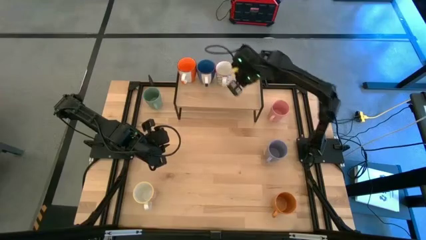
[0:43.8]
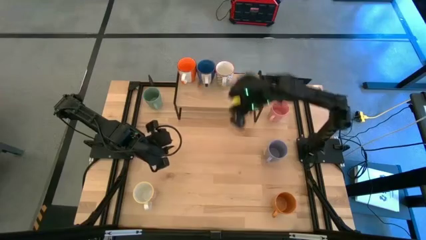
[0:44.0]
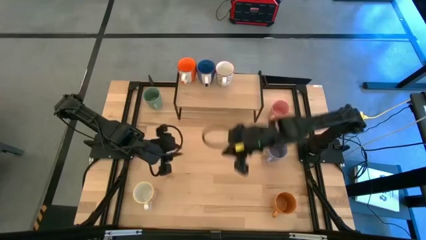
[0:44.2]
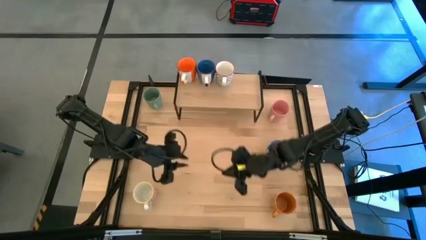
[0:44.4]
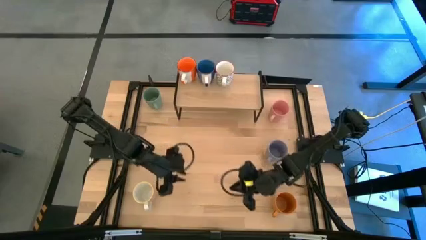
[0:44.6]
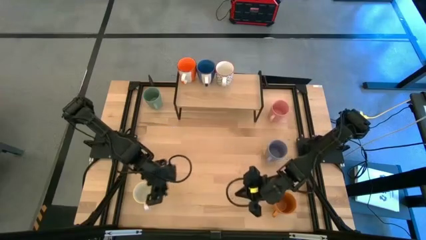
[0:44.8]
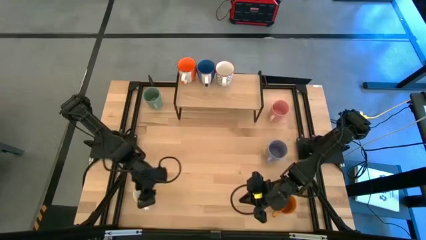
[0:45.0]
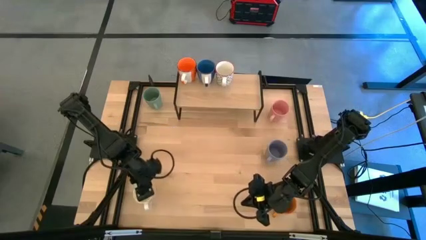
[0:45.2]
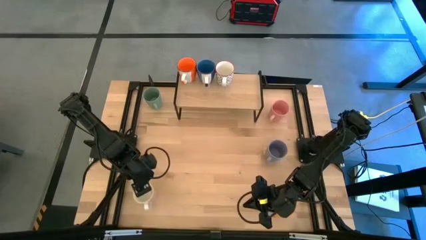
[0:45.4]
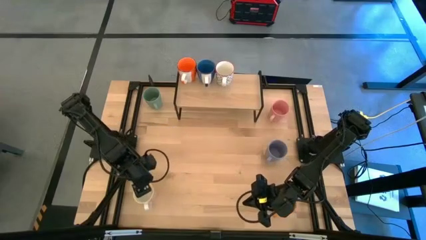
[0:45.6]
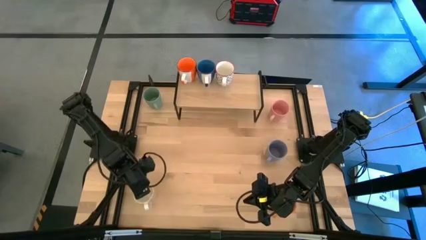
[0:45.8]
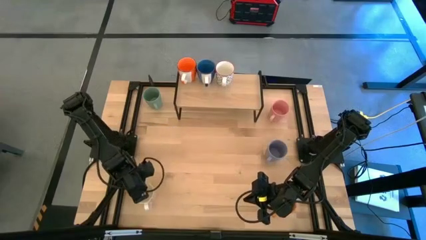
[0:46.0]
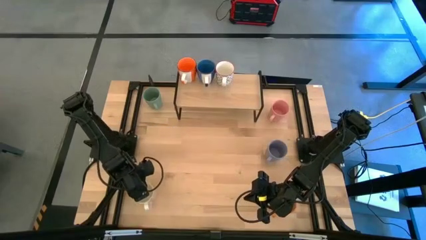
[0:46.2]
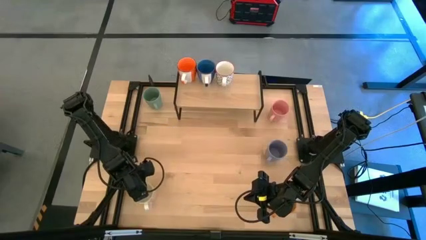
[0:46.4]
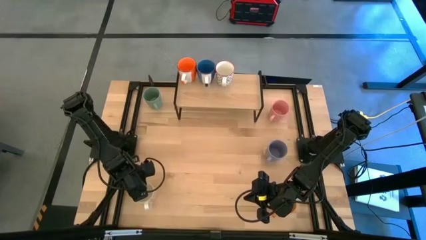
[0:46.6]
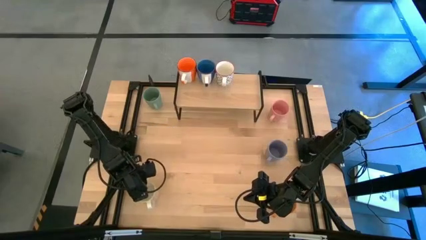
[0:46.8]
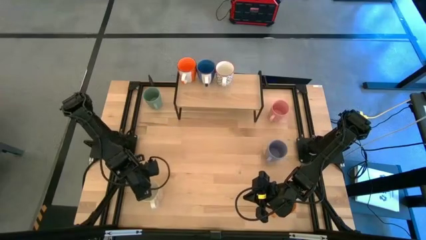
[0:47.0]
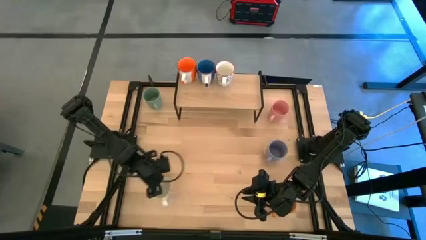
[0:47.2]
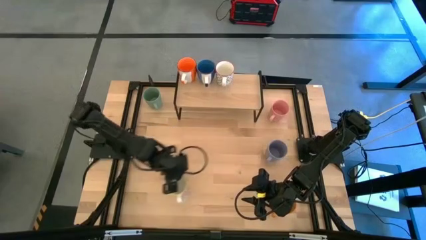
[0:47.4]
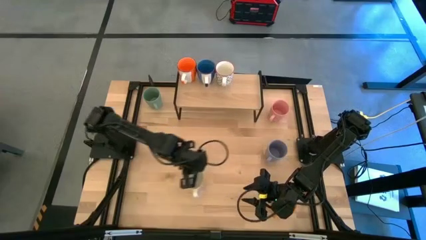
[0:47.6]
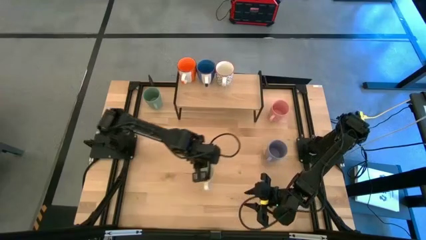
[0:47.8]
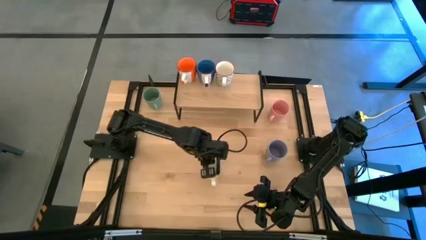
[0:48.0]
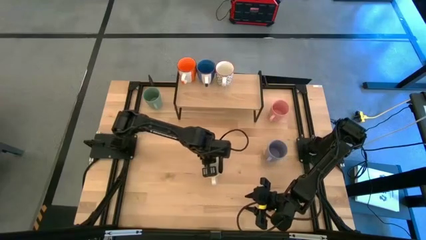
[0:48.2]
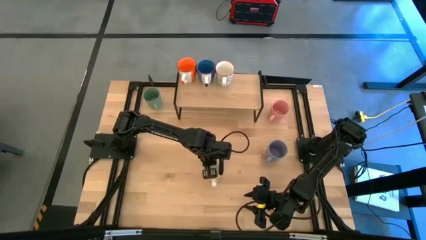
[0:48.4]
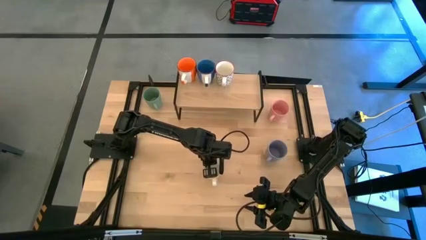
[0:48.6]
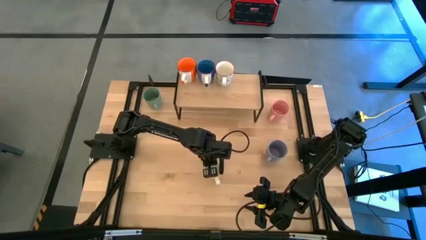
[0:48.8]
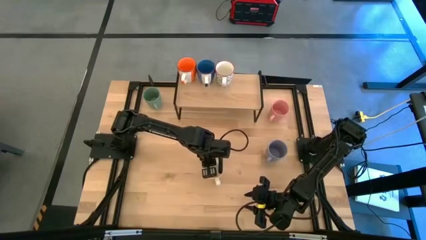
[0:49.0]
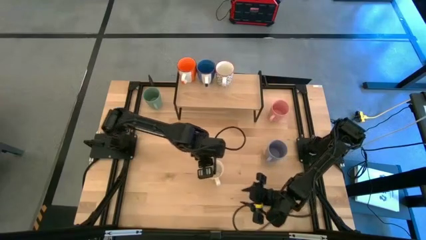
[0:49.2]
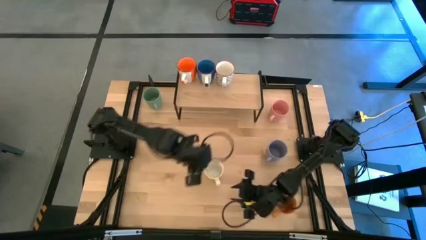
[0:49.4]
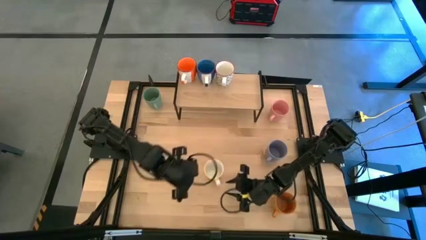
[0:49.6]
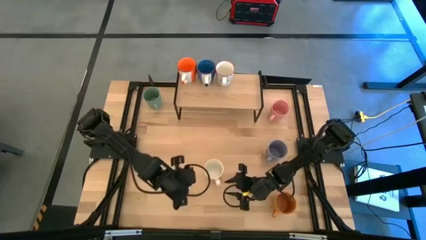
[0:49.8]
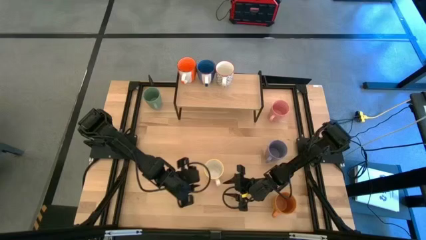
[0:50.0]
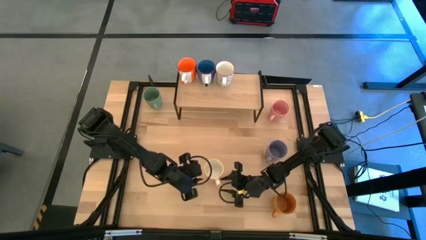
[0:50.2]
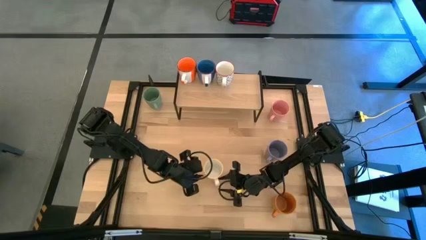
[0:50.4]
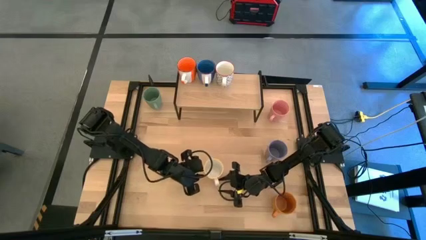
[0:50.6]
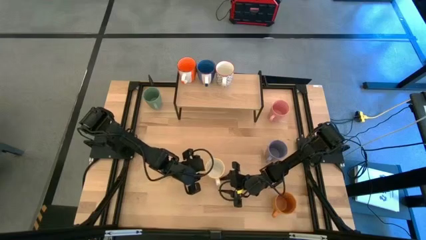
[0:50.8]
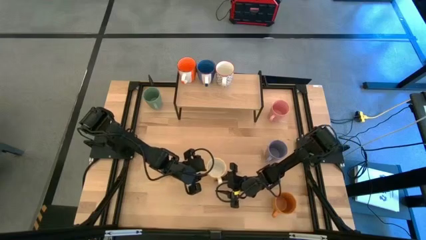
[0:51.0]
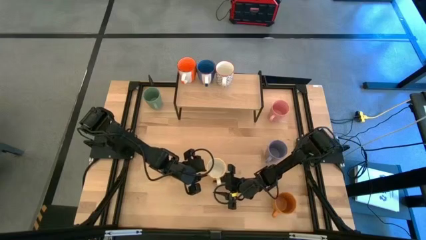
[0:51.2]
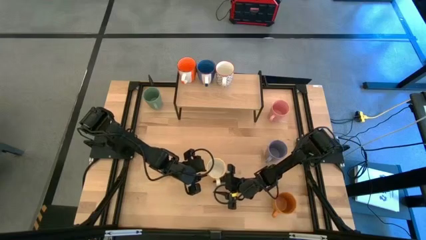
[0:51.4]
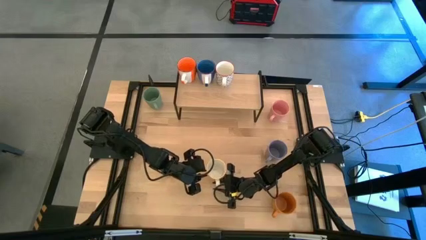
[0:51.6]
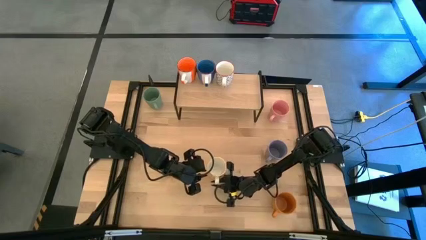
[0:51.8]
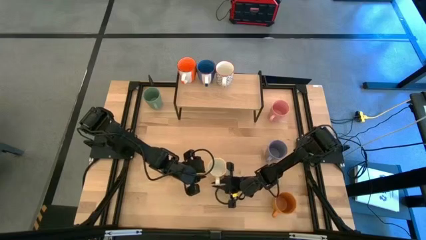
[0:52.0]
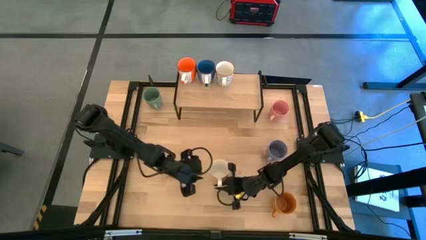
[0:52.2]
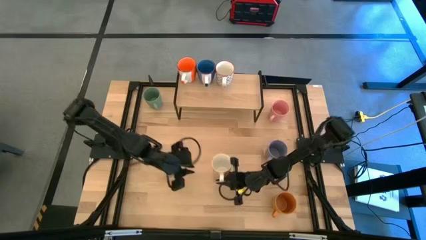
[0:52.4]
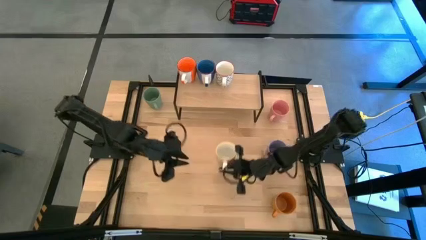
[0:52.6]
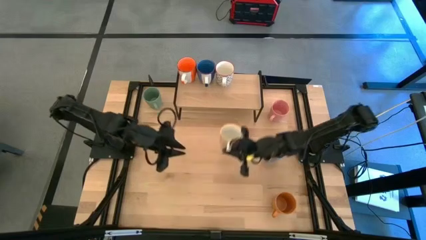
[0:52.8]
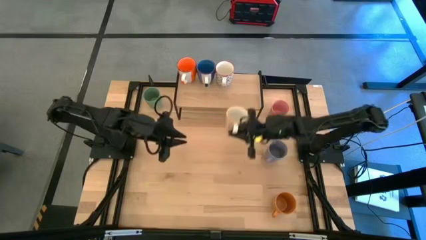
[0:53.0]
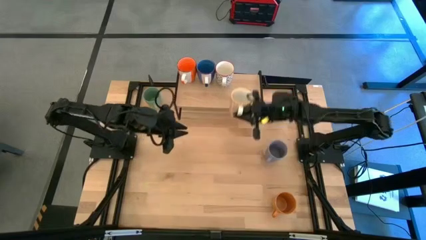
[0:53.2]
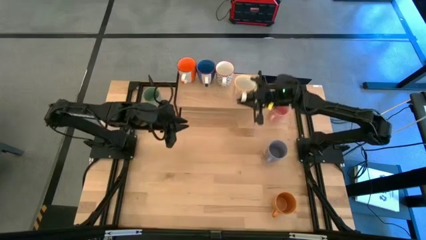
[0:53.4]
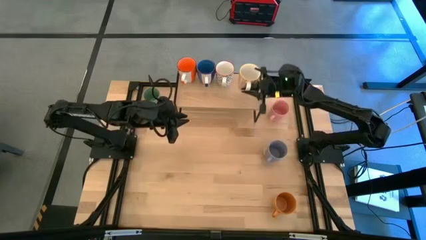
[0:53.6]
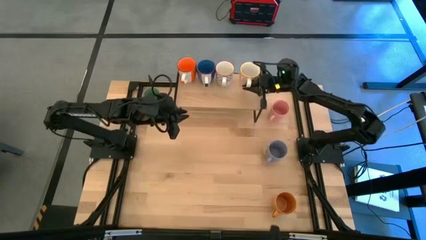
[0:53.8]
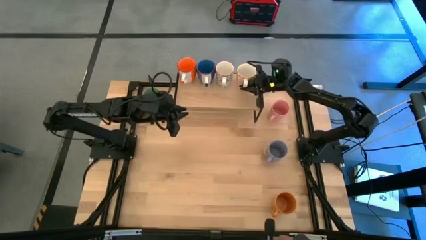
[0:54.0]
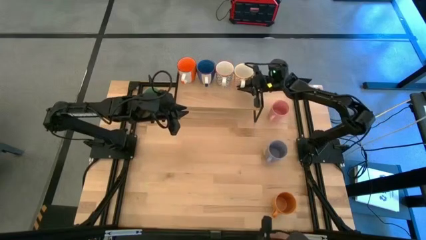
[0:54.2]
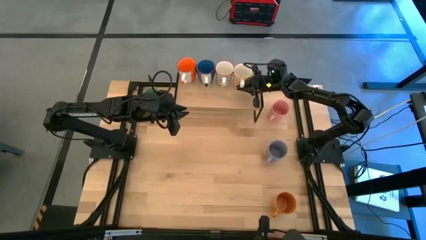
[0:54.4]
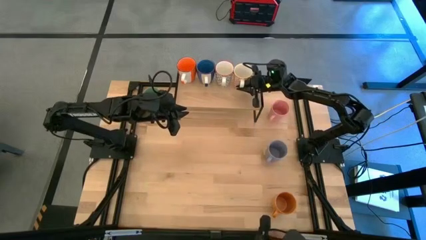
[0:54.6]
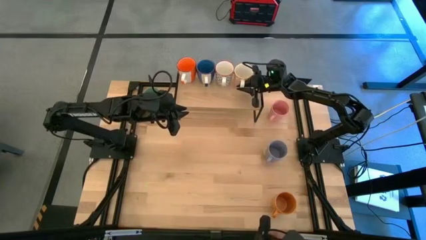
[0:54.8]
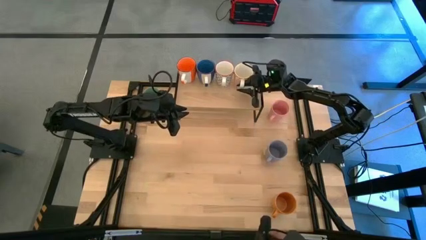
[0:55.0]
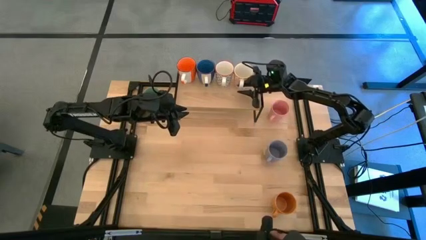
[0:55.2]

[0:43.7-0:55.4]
Task: Place coffee mugs
Put the orange pattern mug on the shelf

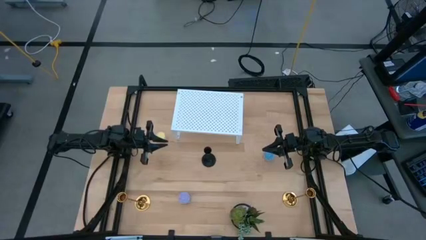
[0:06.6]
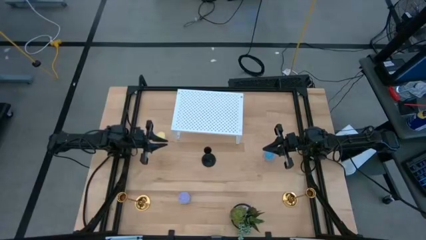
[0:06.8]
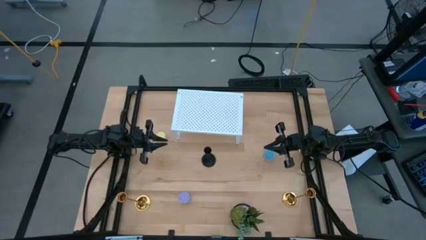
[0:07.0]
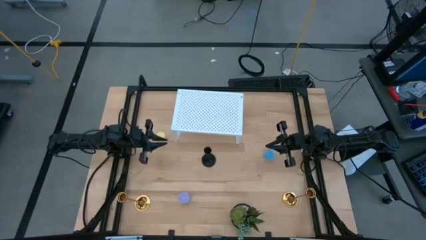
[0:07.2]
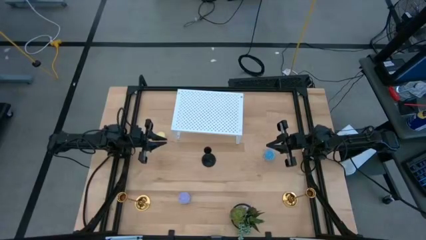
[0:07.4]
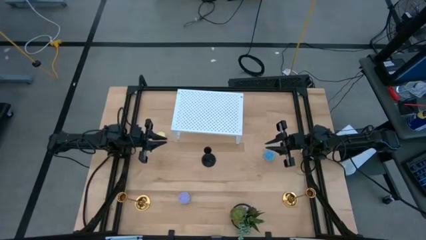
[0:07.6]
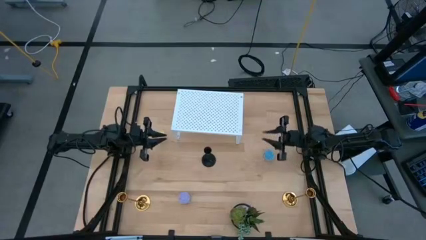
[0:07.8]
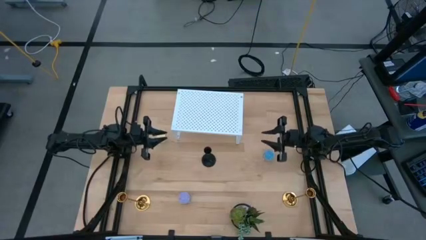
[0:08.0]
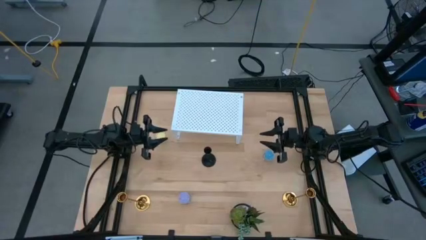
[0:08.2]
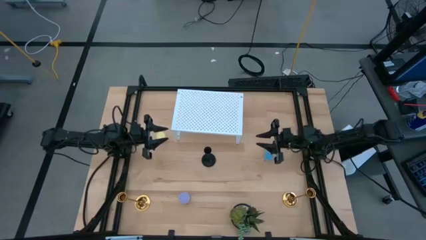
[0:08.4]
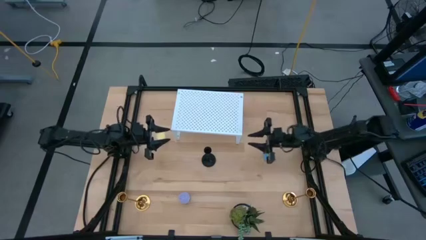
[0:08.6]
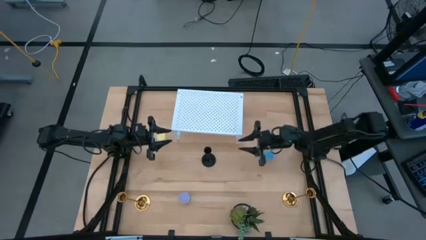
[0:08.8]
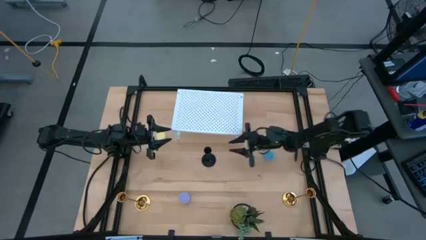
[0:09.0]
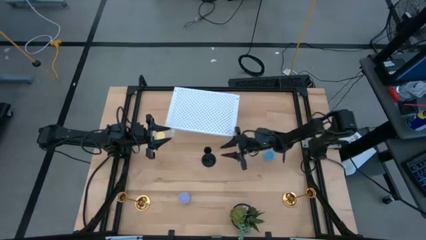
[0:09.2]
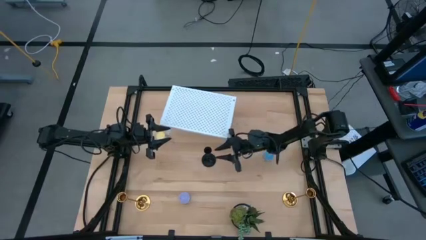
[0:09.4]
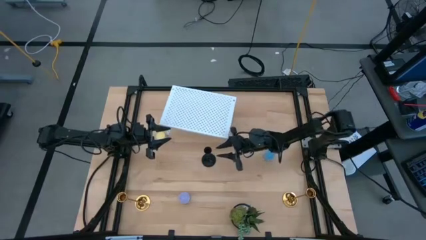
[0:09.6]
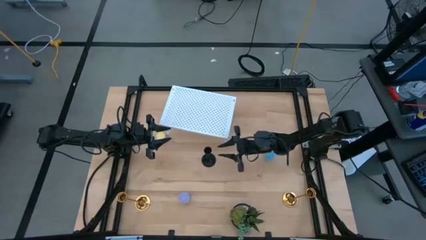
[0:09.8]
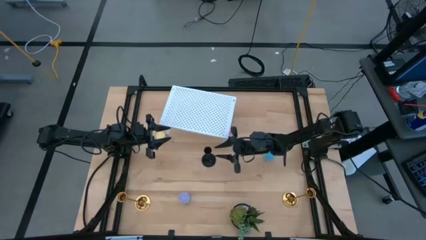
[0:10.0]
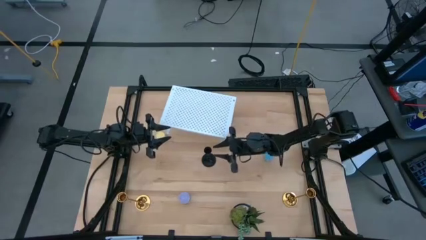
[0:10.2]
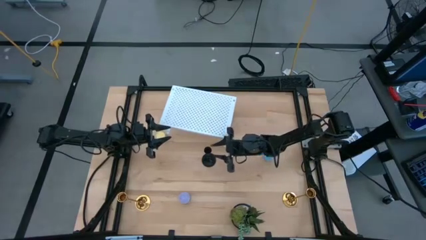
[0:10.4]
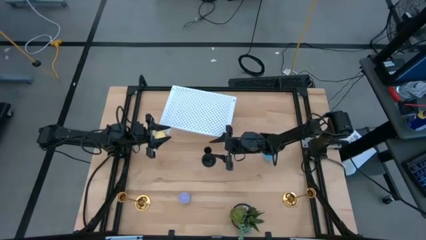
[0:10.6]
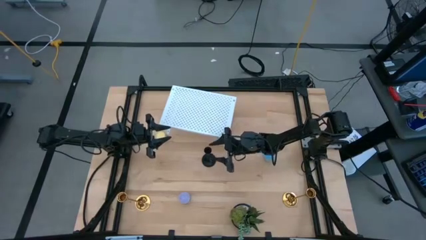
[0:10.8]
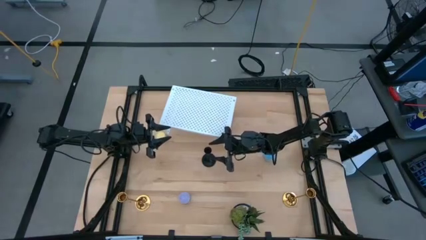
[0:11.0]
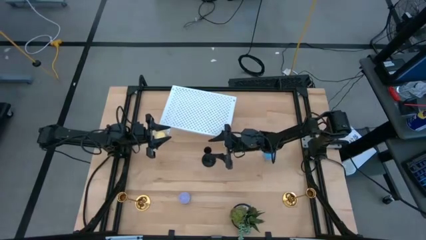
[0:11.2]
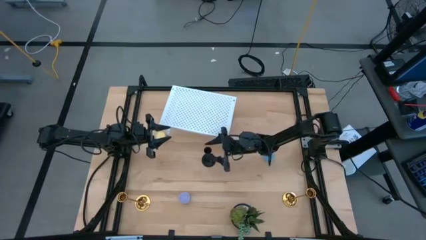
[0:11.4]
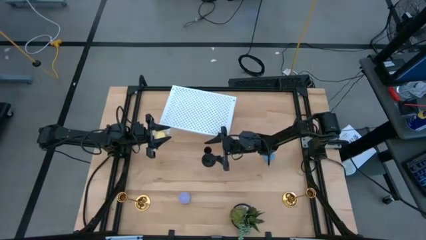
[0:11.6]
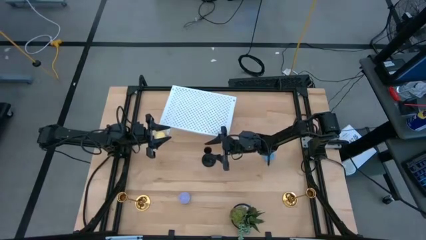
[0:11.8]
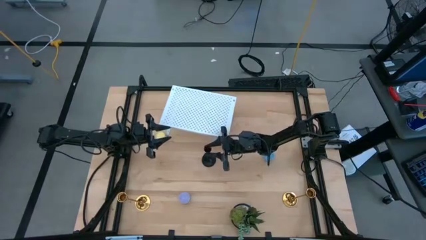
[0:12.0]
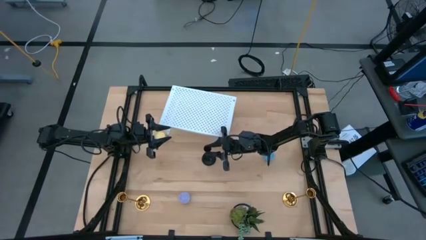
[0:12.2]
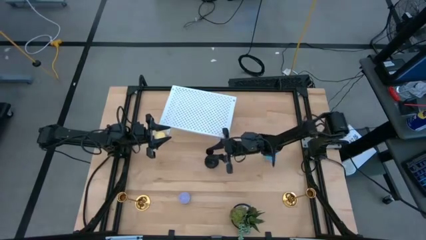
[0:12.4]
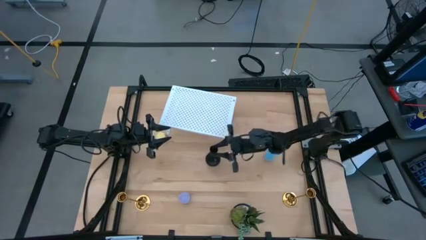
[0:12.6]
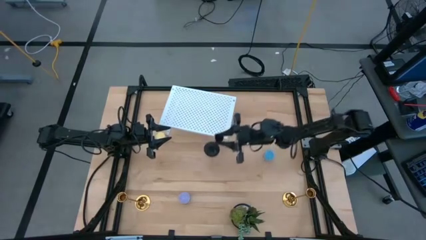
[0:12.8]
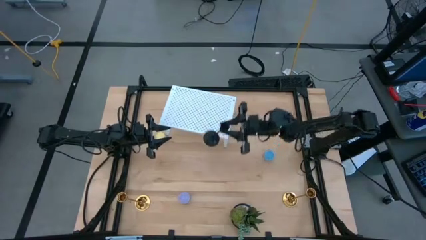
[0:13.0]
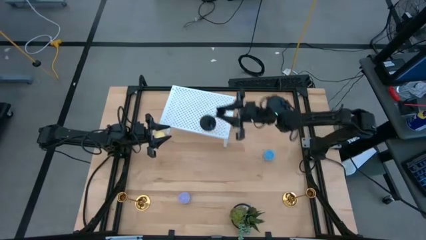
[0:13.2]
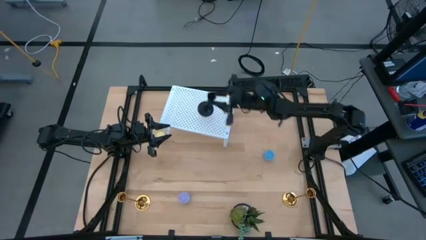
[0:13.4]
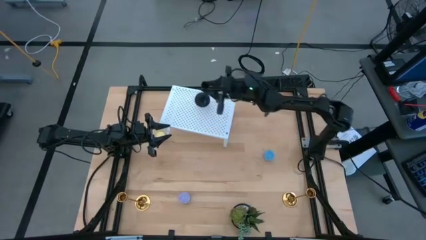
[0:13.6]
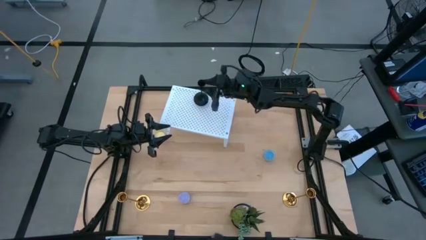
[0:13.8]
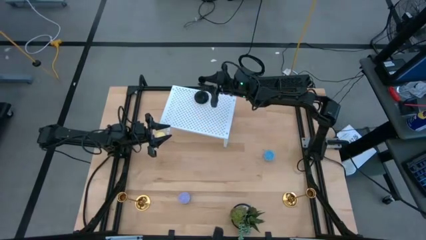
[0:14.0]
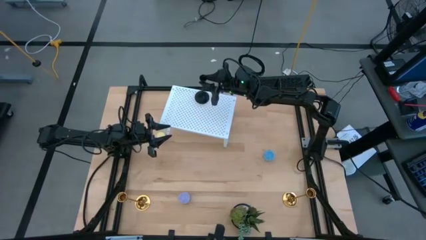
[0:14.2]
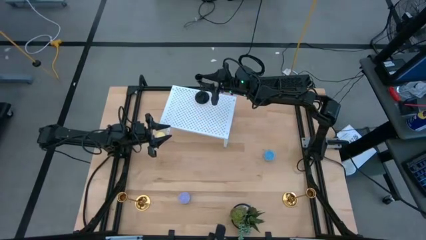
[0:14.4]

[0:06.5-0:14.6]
Task: Pick & Place candle stick holders
Put the black candle holder on the shelf
